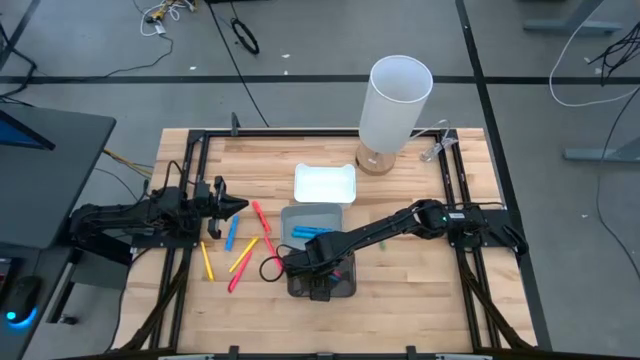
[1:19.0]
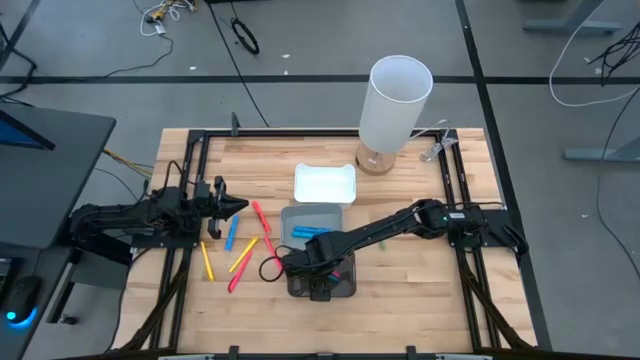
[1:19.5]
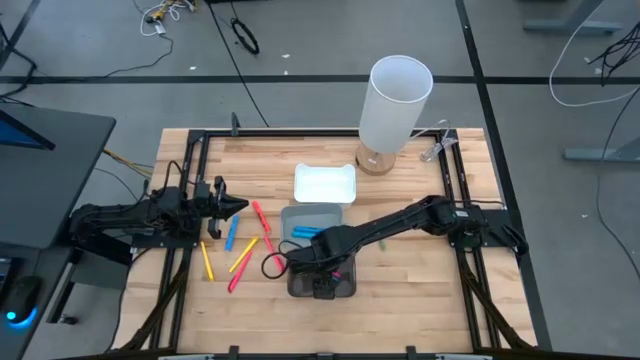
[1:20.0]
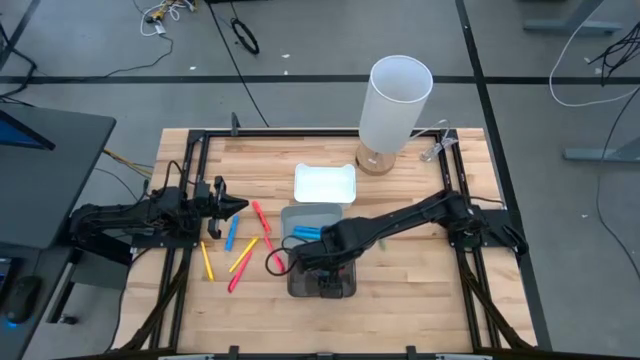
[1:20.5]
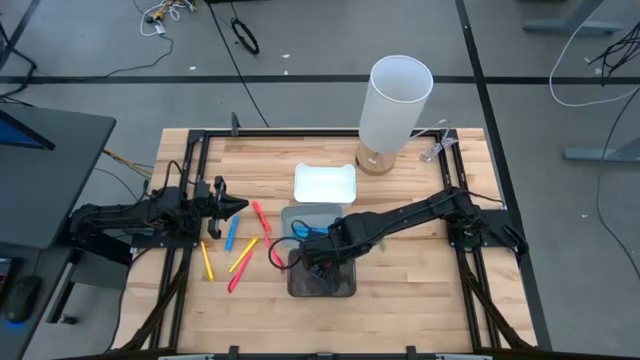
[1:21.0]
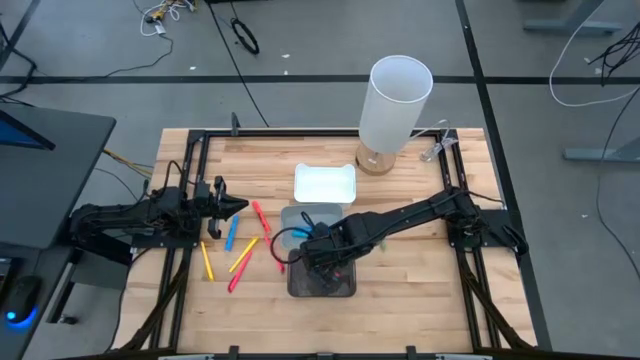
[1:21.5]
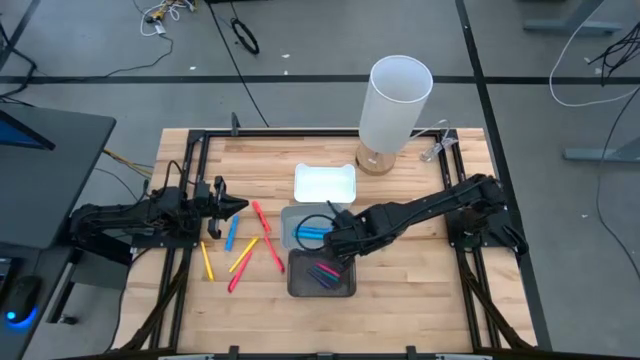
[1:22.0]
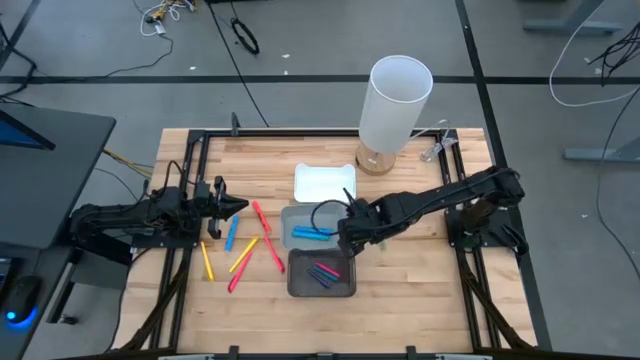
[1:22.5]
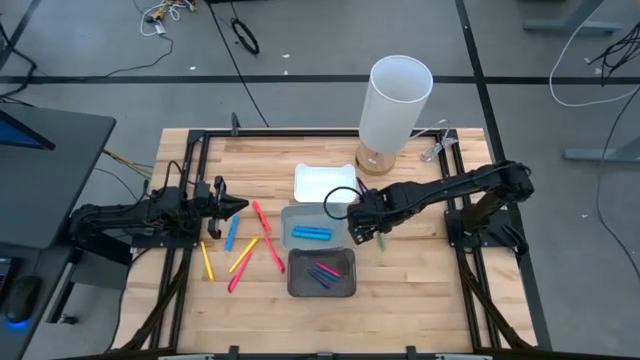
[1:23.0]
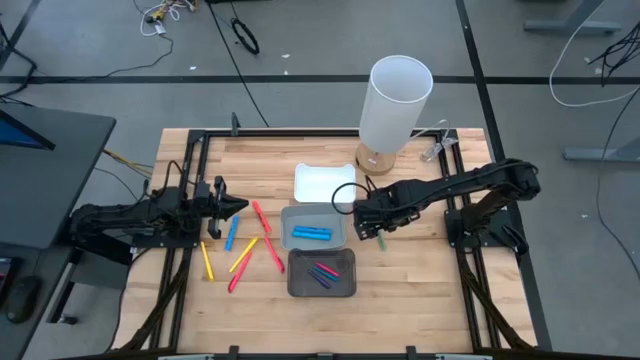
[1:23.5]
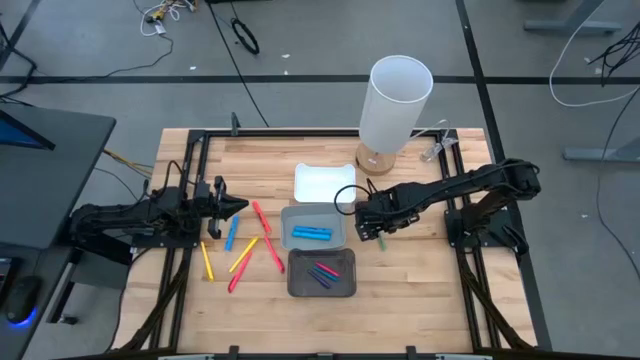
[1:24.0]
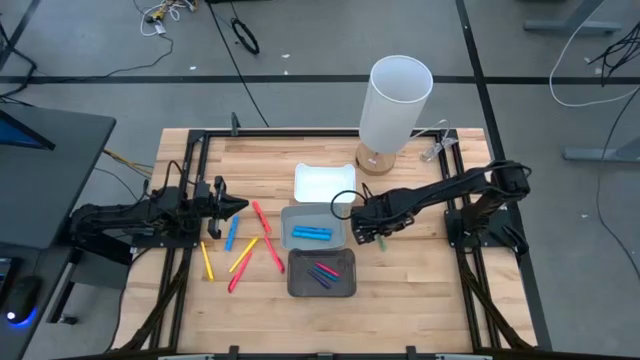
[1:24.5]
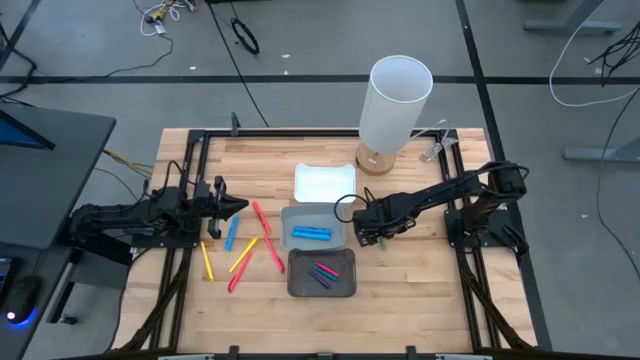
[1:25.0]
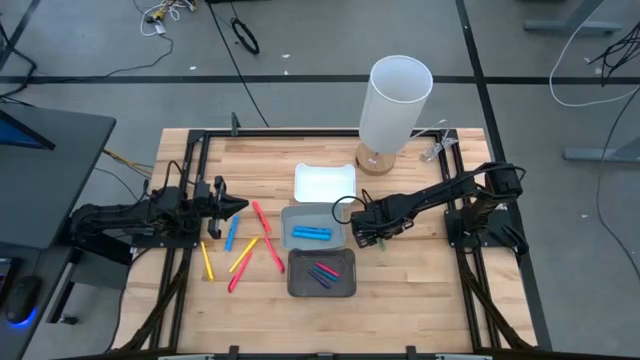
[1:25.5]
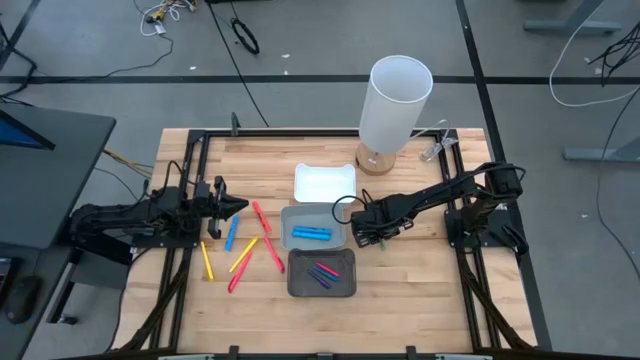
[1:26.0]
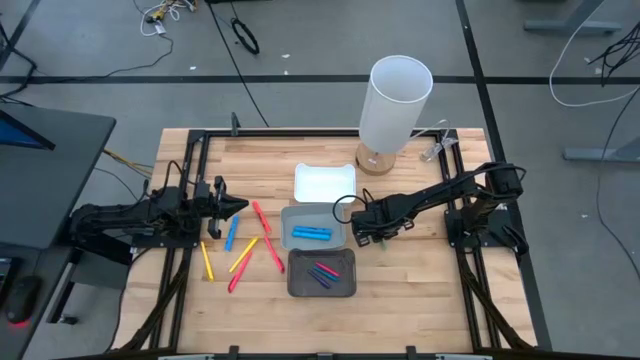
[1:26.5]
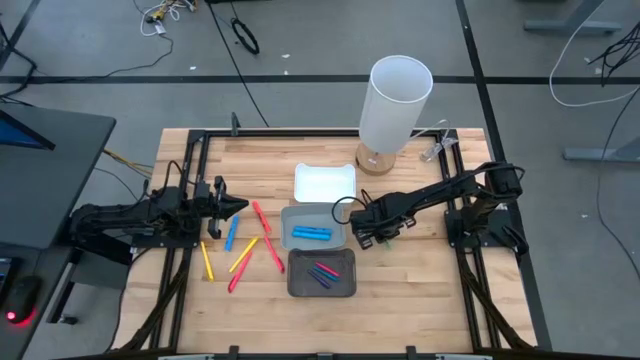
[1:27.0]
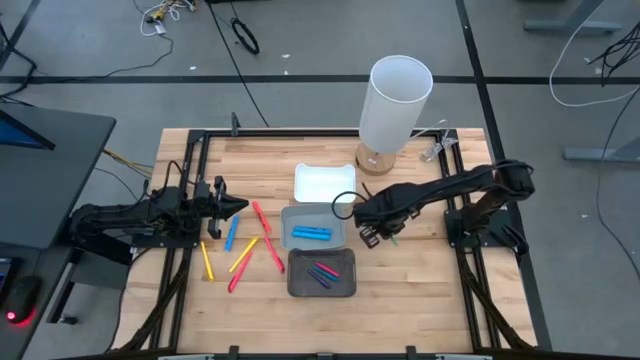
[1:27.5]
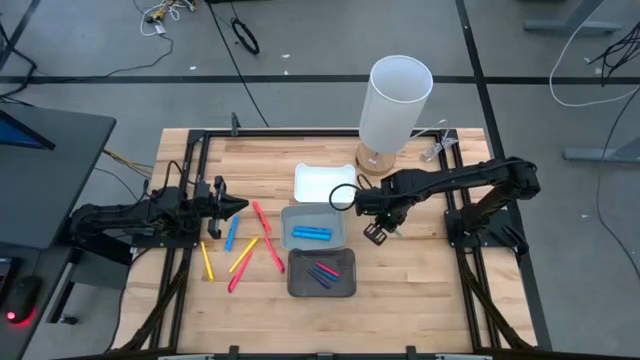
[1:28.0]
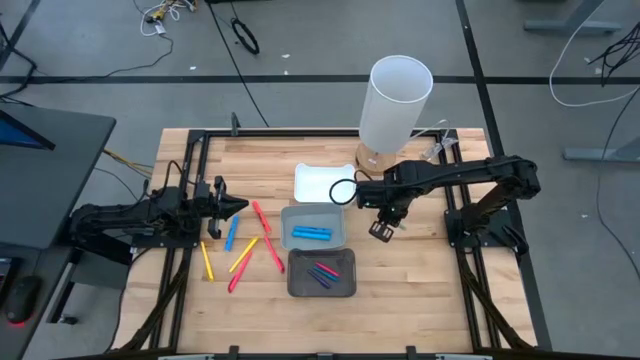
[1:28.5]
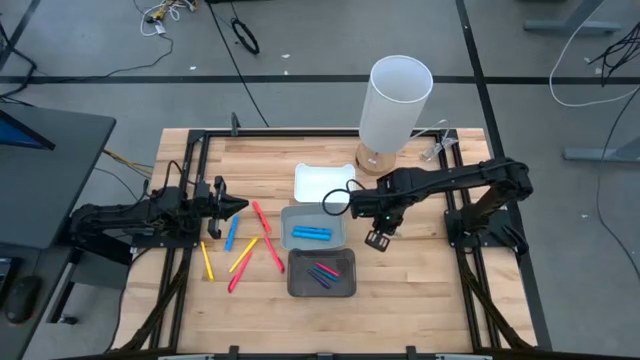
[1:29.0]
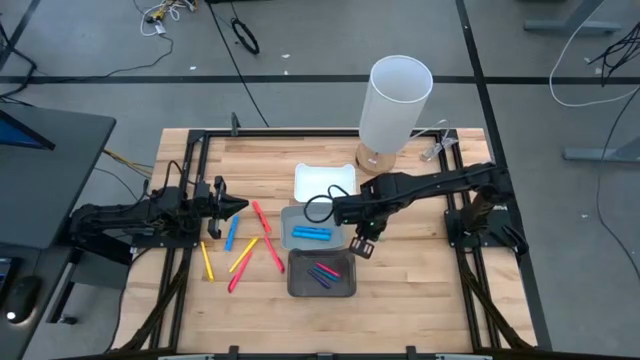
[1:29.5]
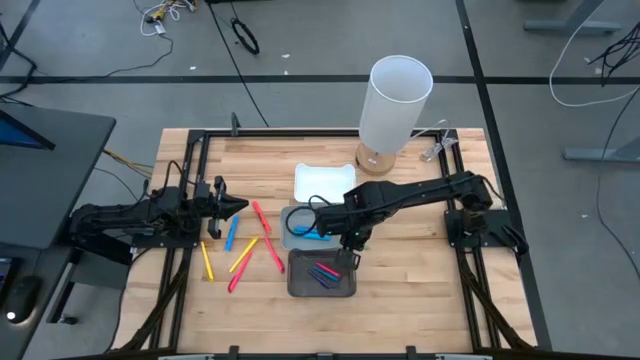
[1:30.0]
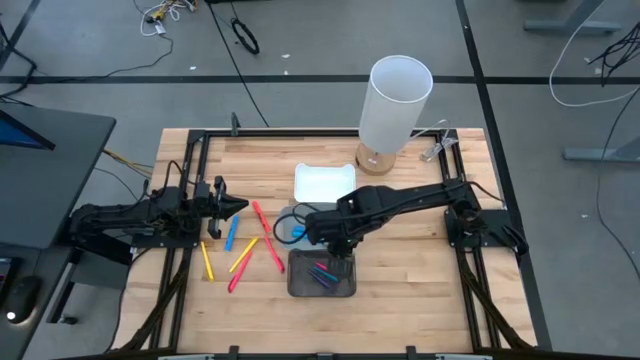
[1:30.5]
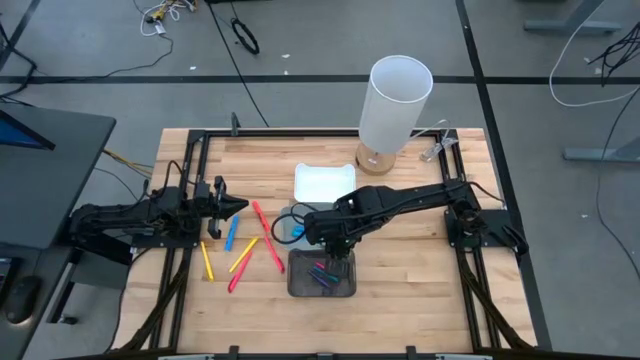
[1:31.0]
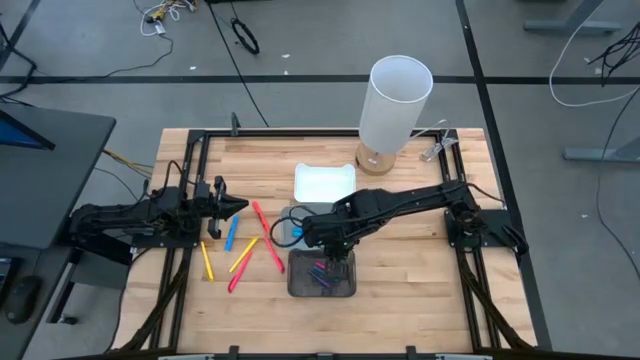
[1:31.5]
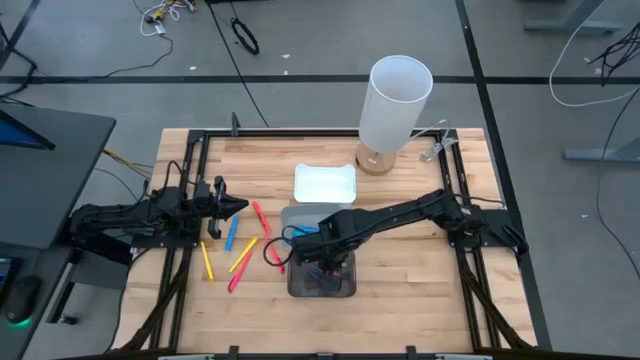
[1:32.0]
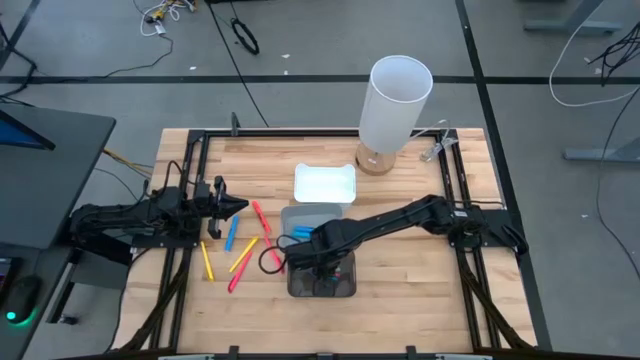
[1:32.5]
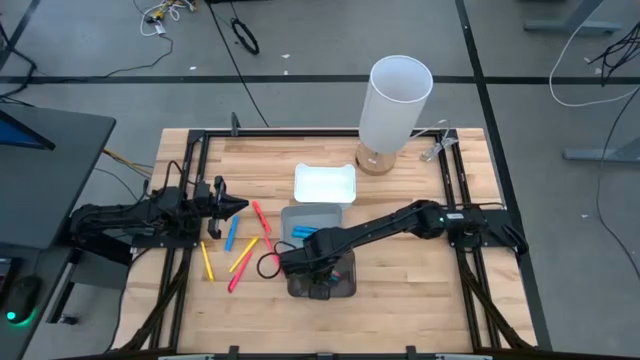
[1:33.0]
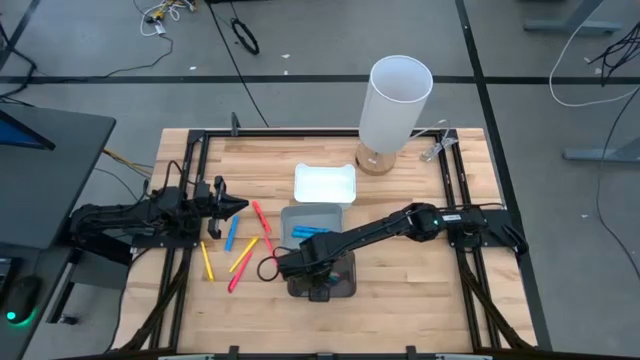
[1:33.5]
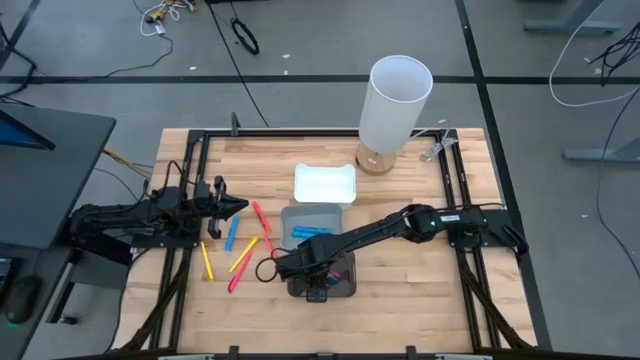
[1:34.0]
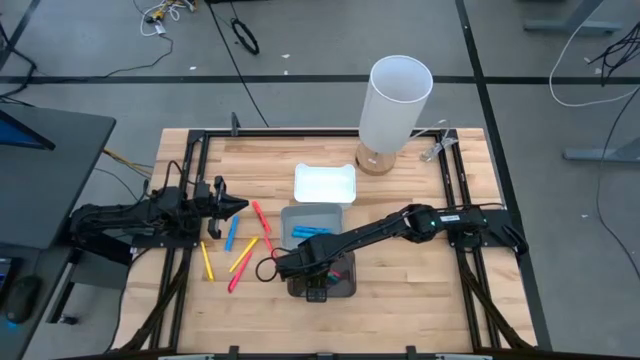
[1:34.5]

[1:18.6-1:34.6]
Task: Pick & Place Markers
Put the green pen into the black transparent bin

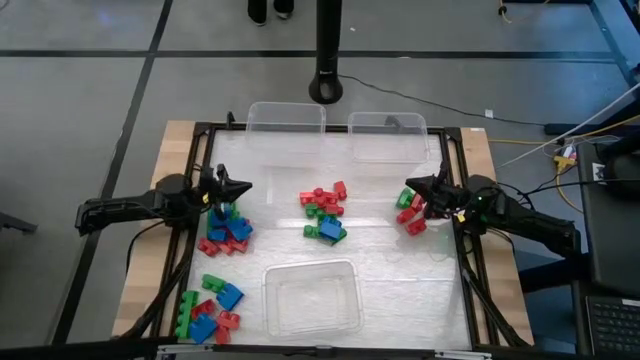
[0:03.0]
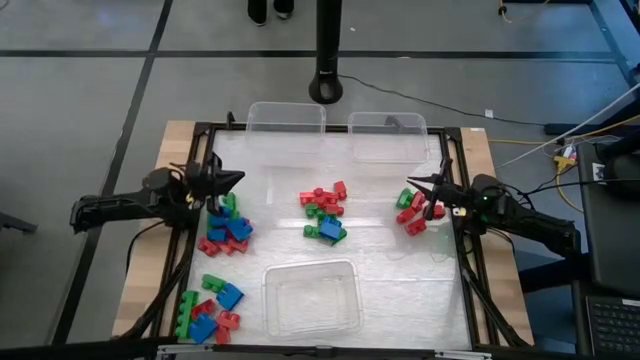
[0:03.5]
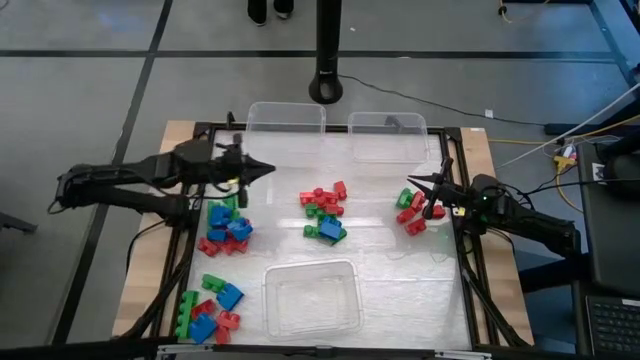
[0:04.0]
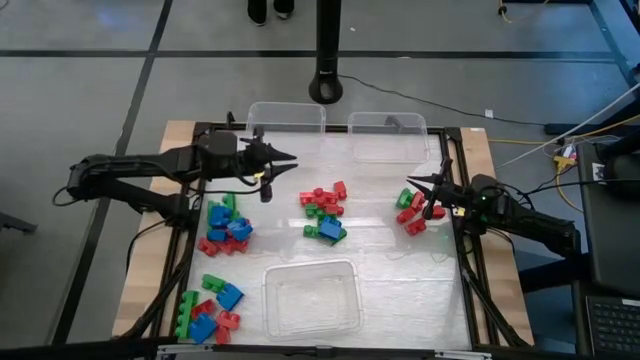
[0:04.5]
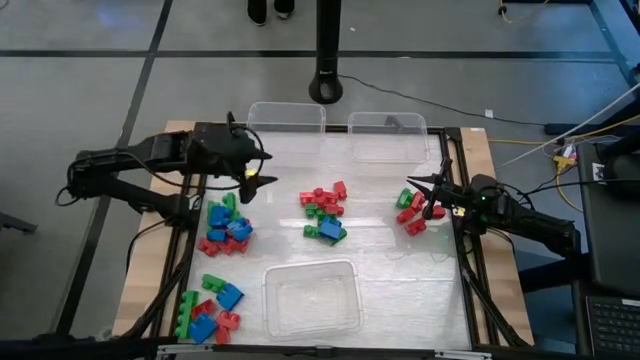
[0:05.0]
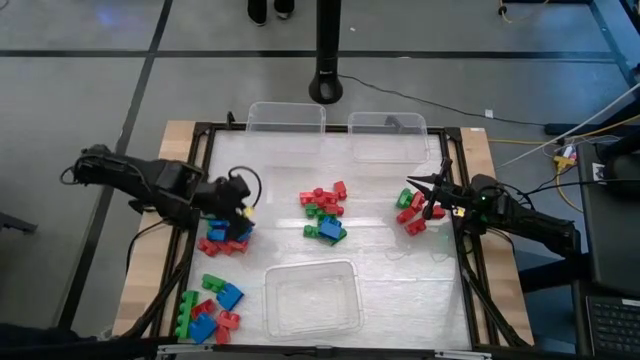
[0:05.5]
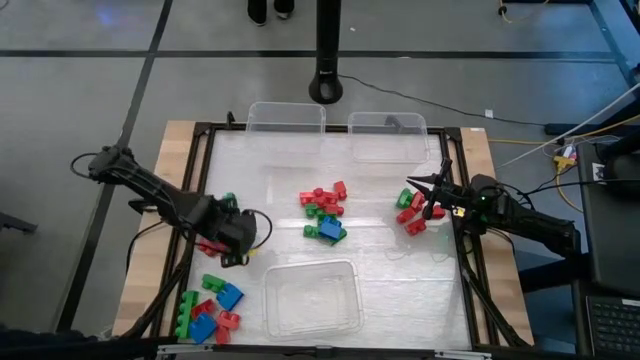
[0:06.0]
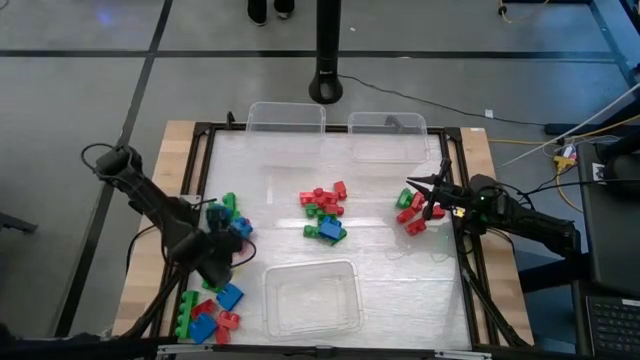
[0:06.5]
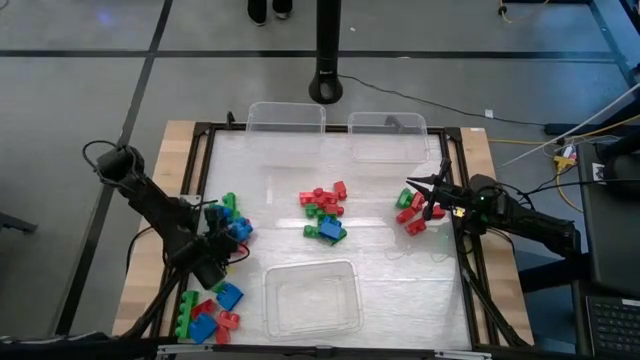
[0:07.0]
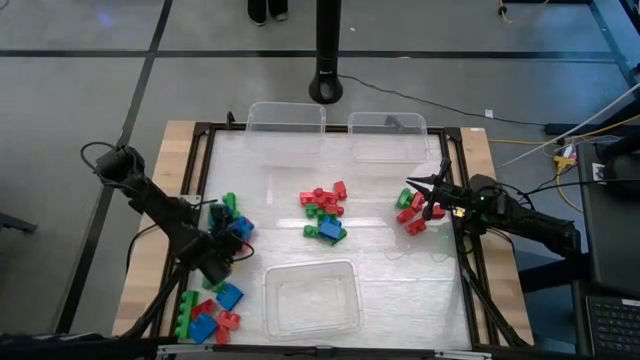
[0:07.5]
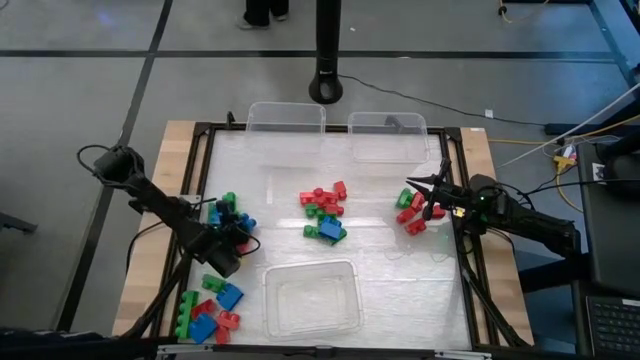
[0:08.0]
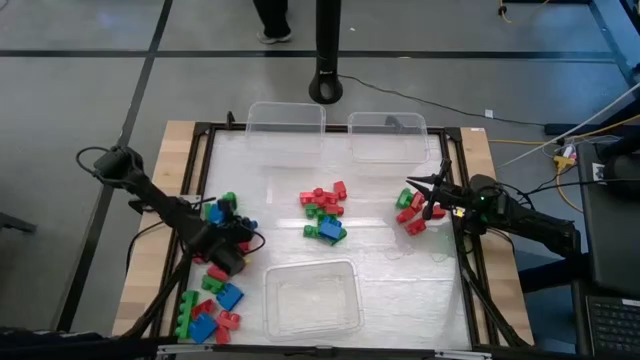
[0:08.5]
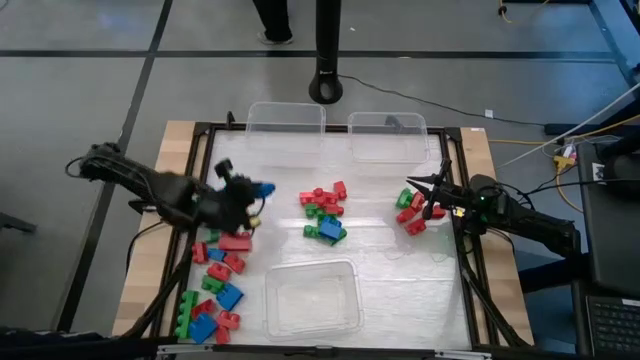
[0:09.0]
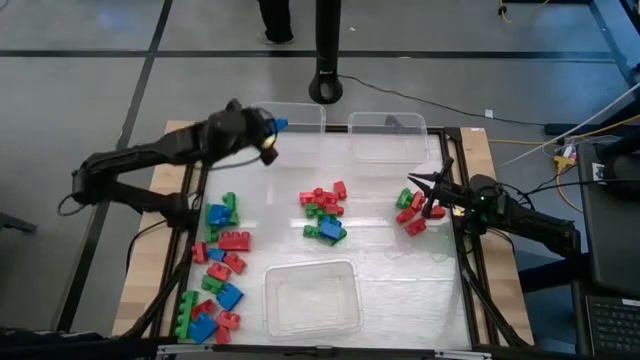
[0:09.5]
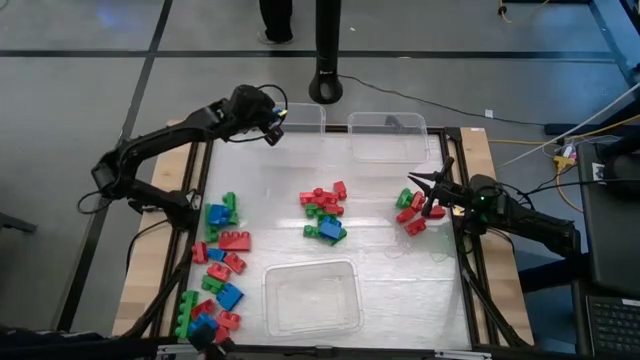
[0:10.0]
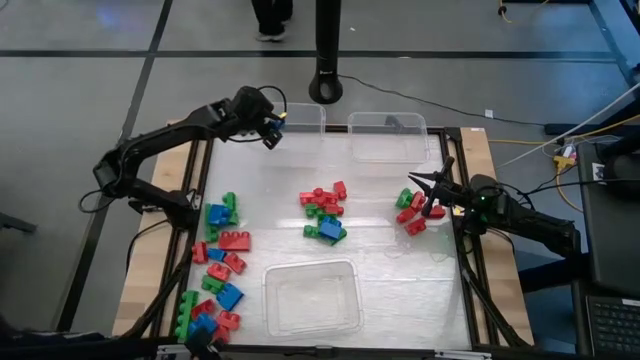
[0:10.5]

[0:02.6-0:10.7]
Task: Sort blocks
Put the blue game piece into the top left transparent bin
